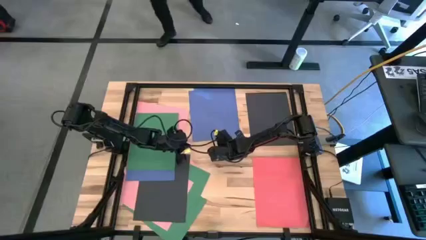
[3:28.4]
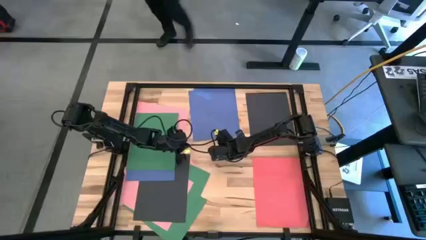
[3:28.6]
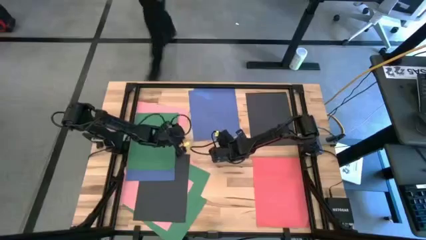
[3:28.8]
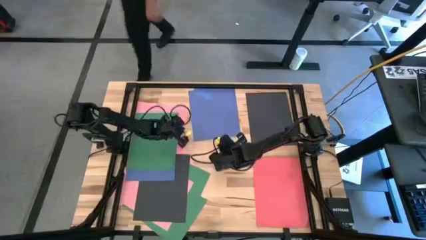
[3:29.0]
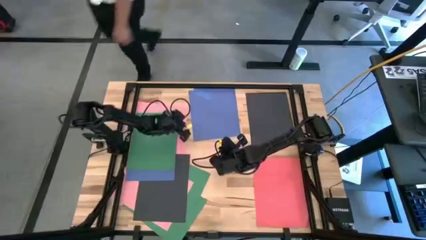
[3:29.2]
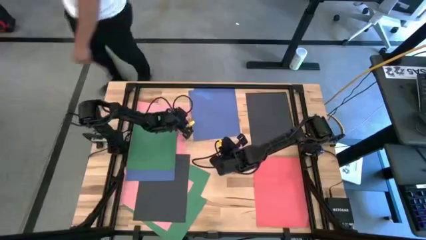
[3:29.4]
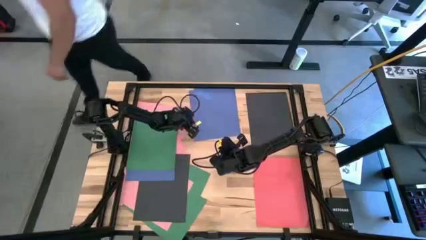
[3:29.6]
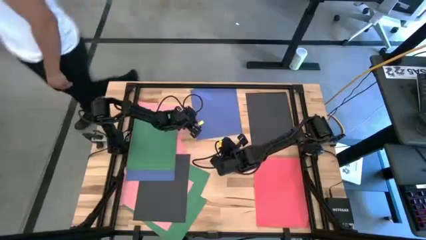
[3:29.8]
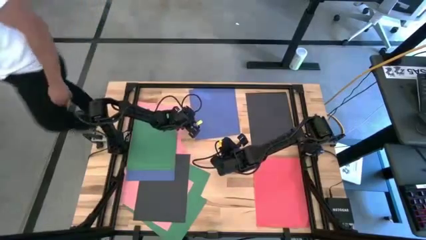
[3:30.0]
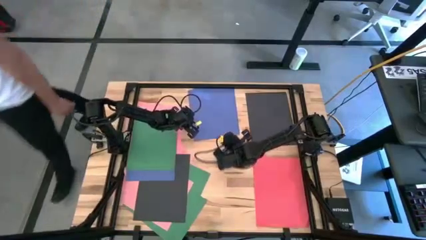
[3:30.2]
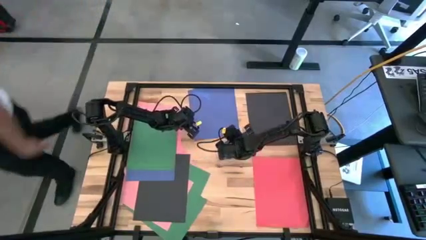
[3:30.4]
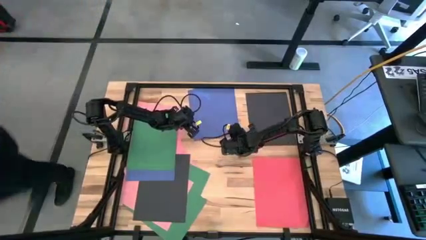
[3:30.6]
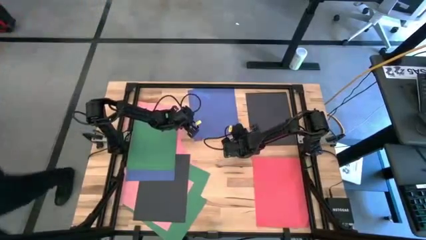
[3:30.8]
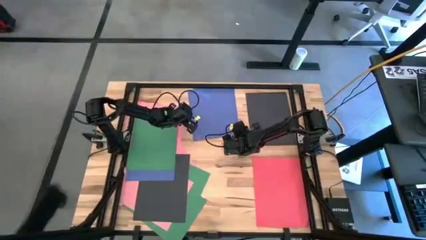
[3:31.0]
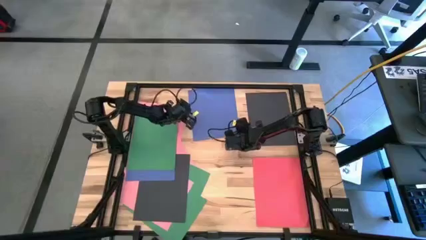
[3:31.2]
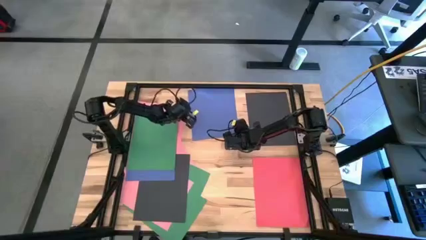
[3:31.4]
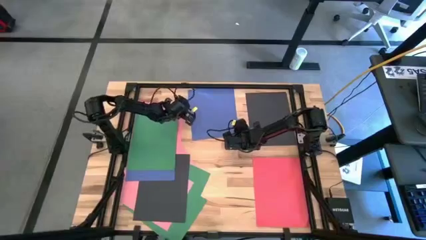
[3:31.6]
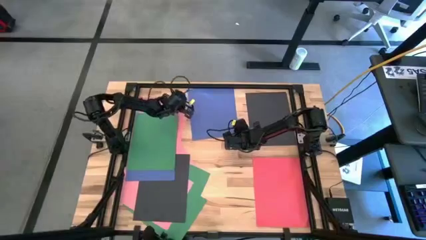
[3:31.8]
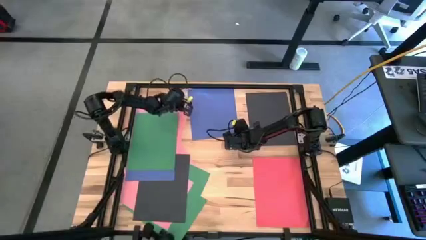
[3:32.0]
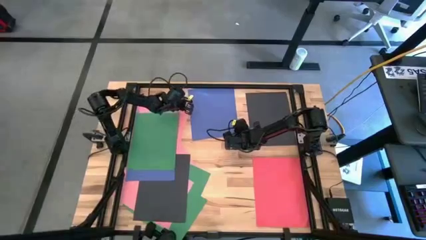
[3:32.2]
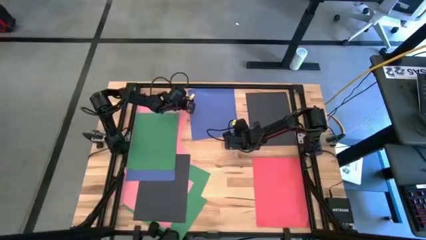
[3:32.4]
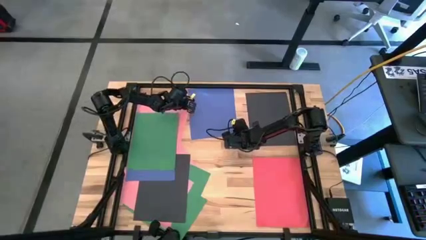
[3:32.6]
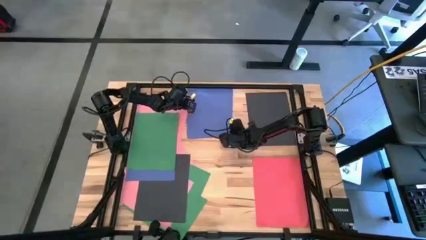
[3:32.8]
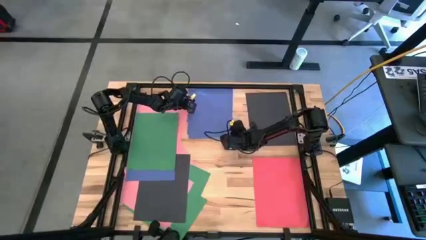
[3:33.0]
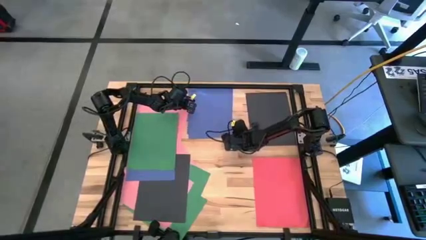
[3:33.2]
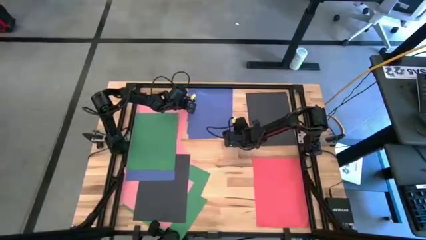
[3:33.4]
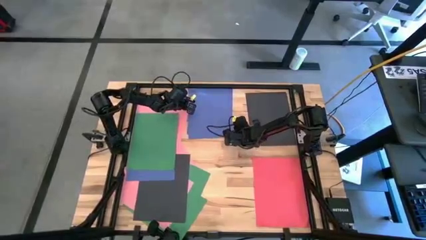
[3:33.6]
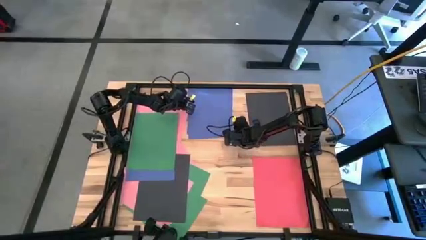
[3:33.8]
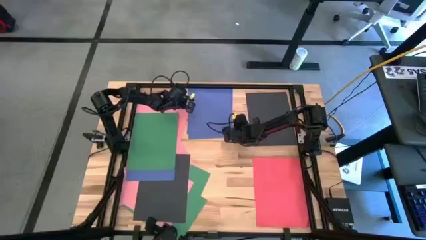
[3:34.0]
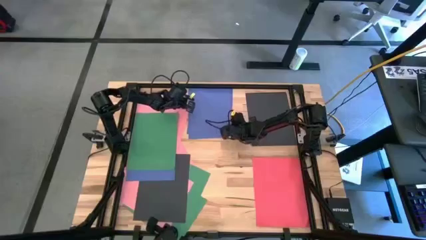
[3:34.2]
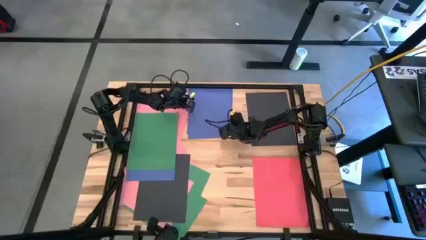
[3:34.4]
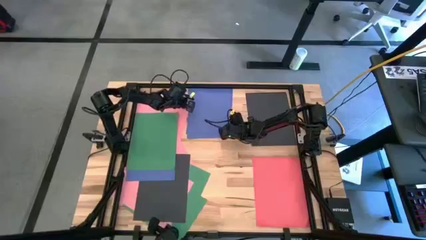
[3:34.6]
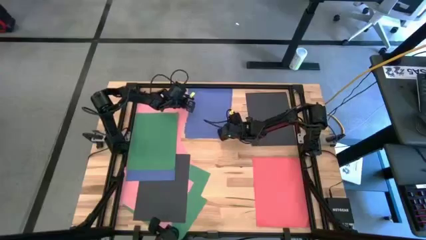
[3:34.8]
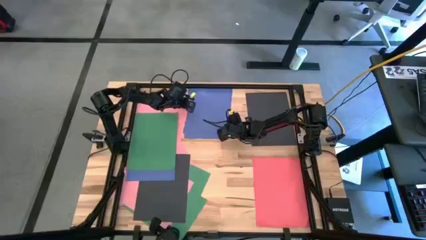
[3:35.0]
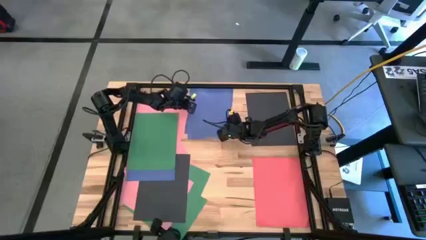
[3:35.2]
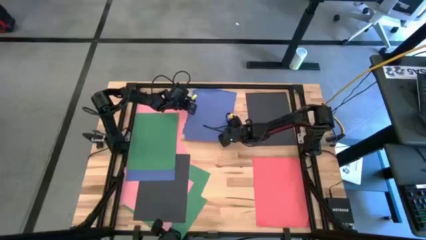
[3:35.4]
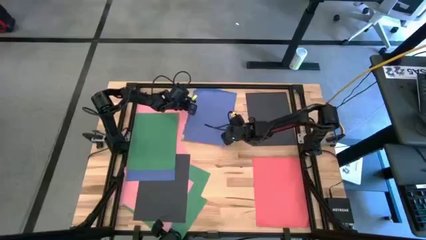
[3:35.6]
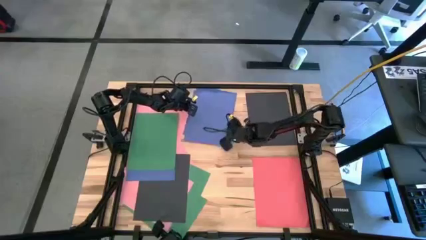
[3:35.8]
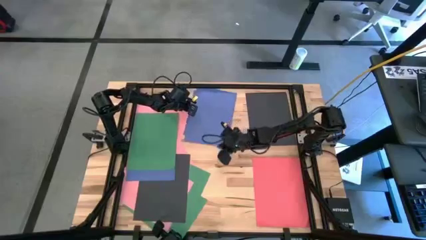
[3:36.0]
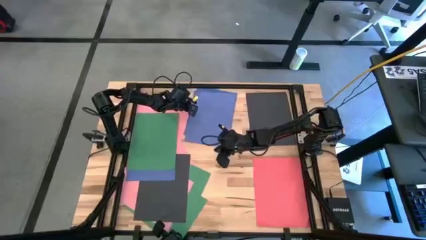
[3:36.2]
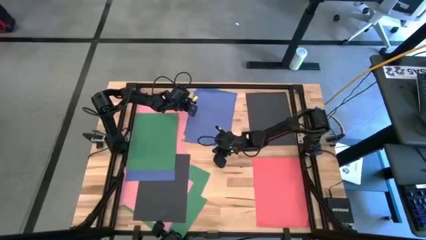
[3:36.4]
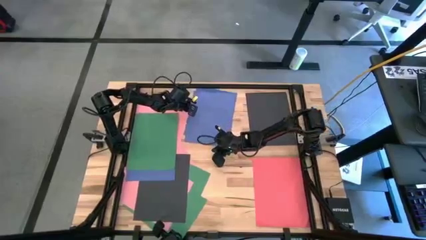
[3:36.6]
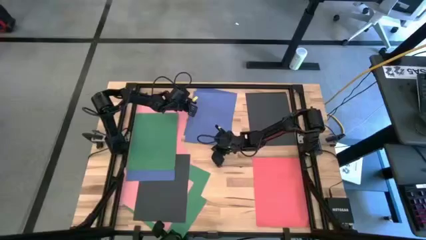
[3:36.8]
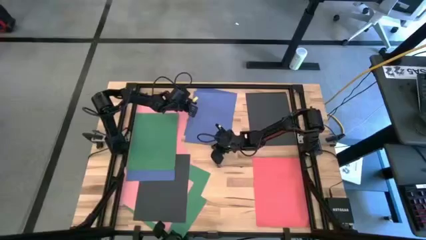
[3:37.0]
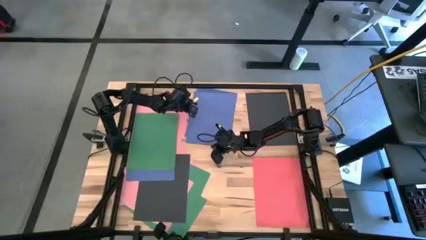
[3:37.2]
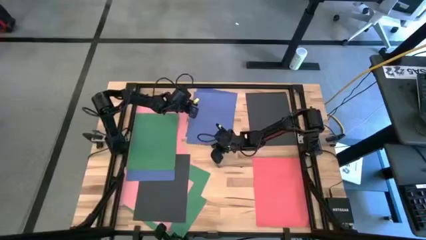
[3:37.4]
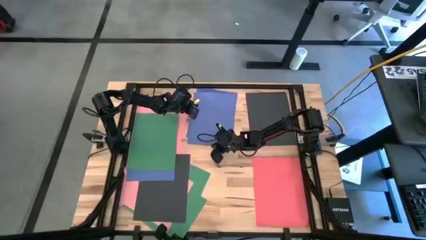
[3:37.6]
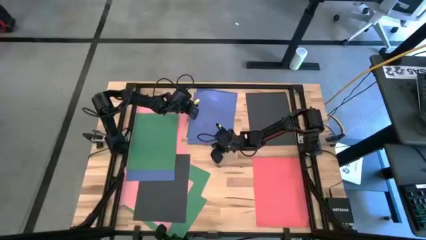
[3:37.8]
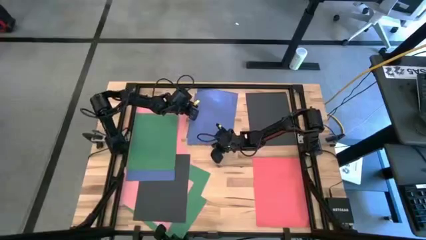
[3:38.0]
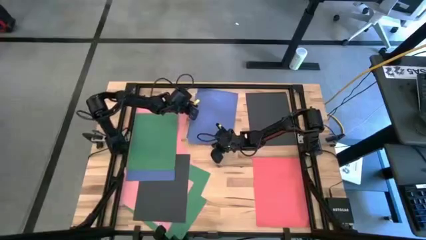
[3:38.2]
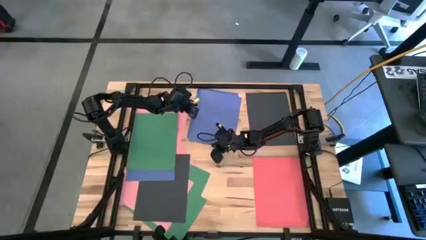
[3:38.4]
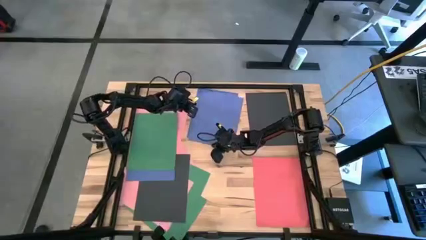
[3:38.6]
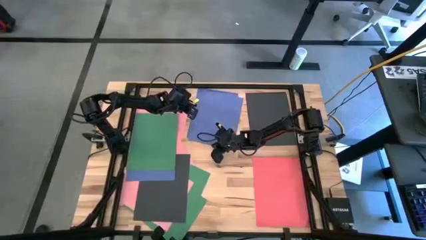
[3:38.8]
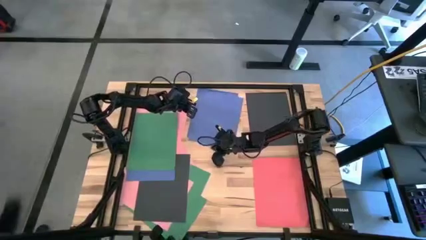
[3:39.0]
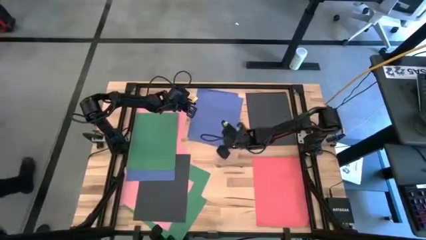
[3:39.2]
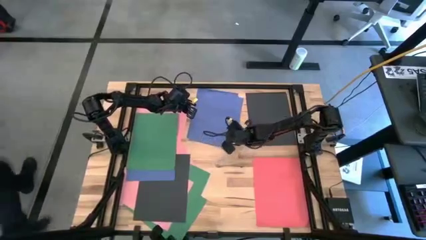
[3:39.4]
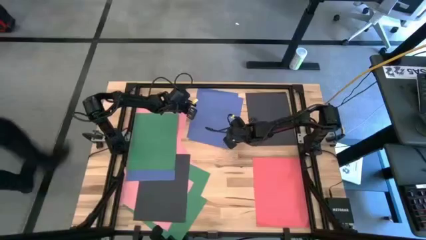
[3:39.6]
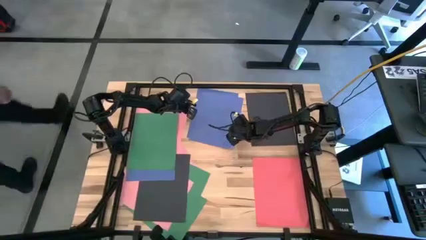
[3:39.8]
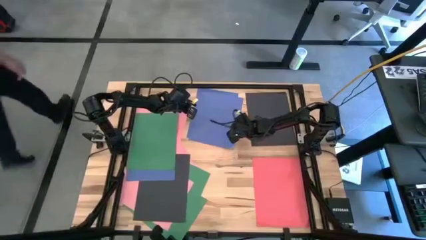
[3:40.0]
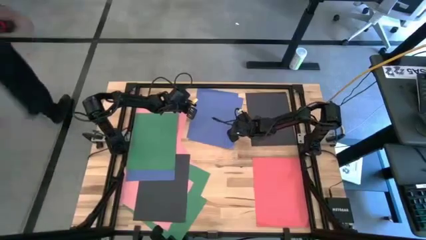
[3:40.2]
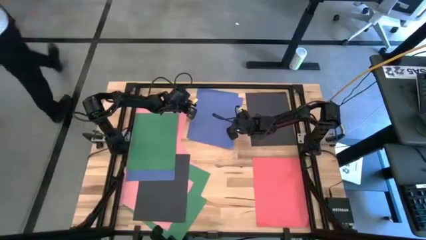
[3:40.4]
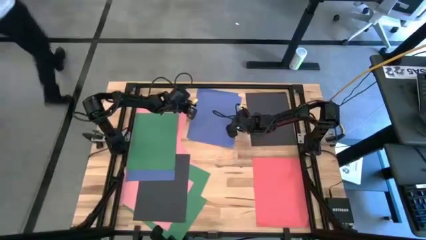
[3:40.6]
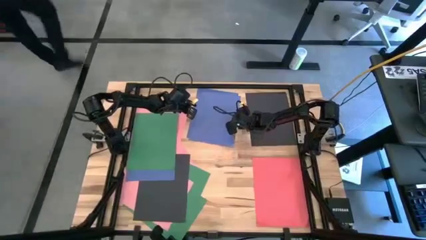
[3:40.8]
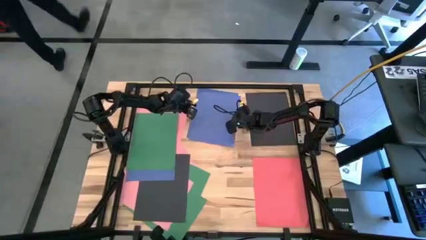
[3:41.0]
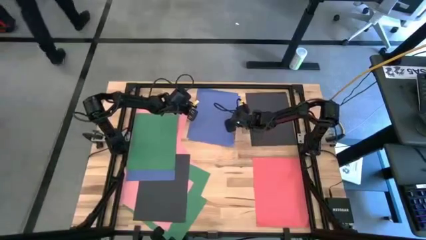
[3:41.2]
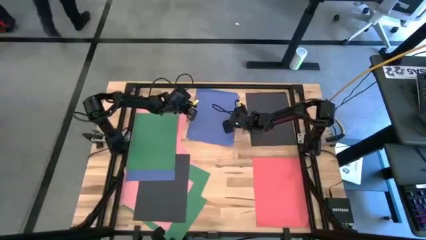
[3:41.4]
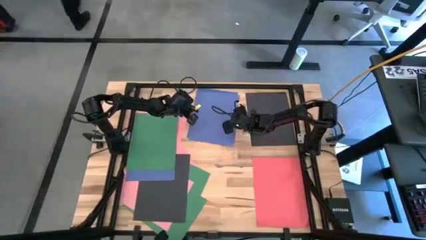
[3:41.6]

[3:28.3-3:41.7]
Task: Organize paper
Stack the blue paper on top of the other blue paper on the table

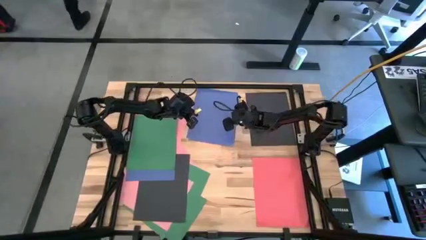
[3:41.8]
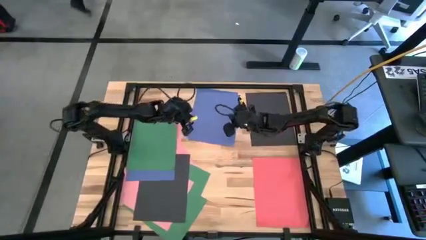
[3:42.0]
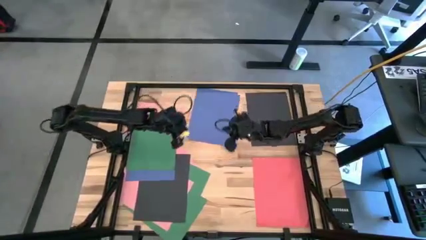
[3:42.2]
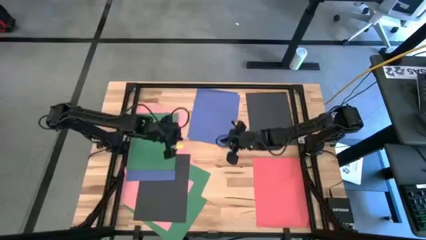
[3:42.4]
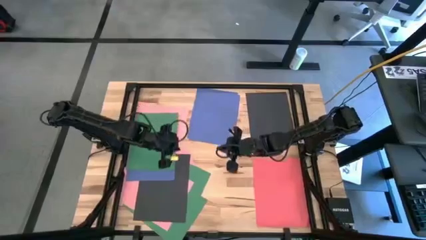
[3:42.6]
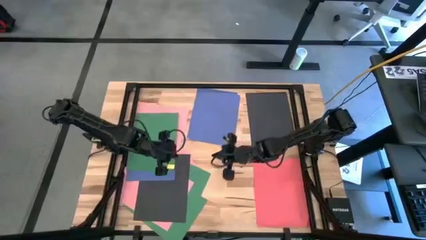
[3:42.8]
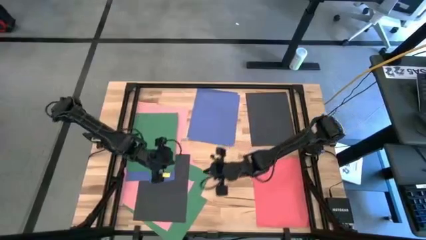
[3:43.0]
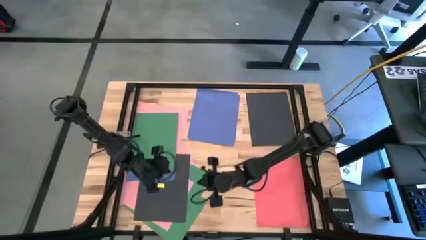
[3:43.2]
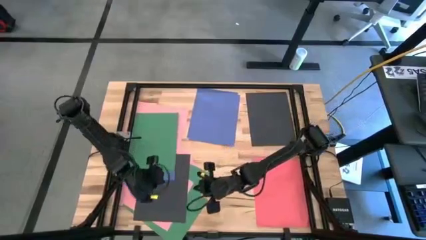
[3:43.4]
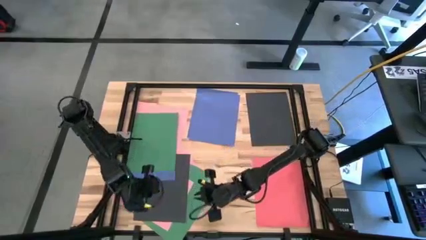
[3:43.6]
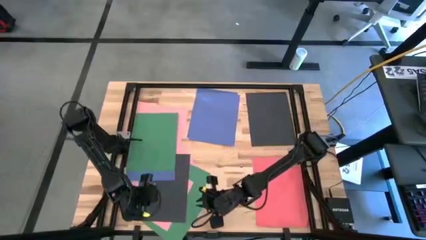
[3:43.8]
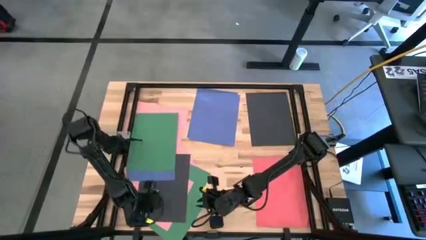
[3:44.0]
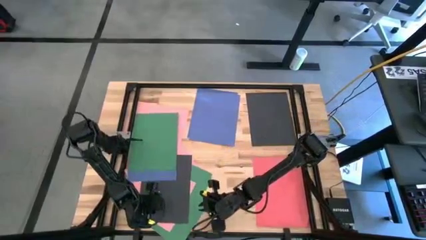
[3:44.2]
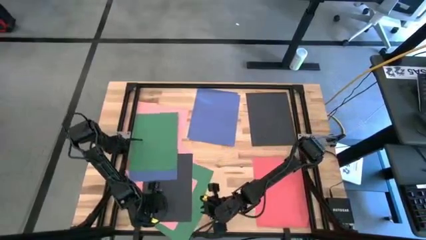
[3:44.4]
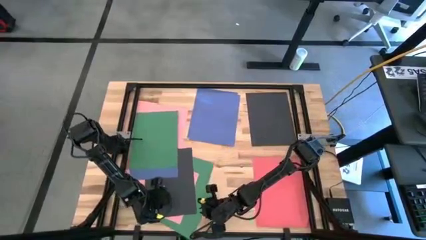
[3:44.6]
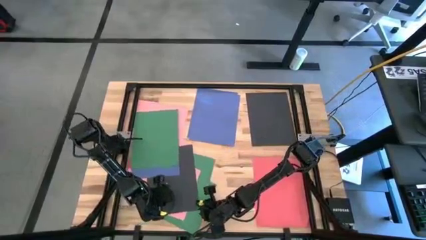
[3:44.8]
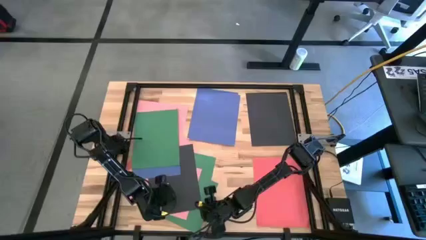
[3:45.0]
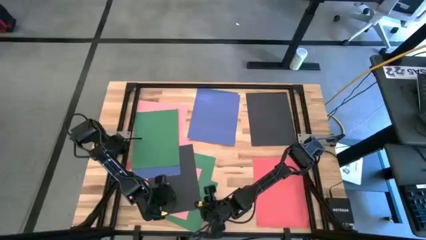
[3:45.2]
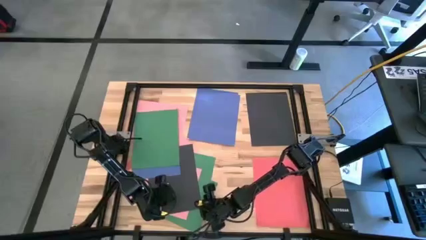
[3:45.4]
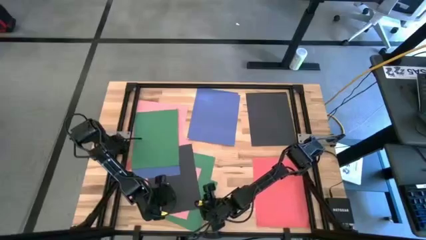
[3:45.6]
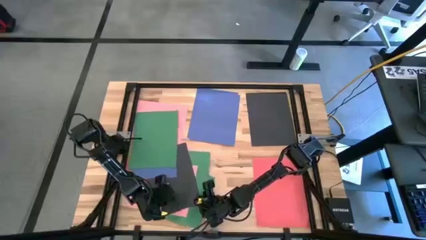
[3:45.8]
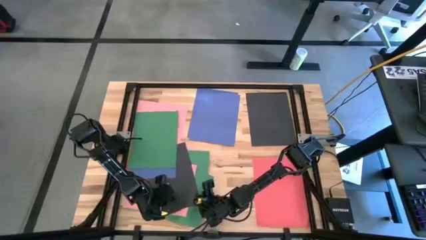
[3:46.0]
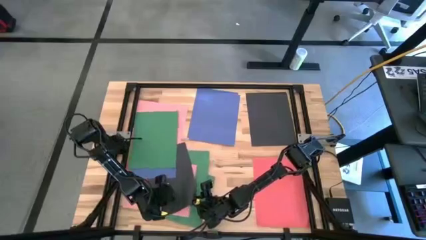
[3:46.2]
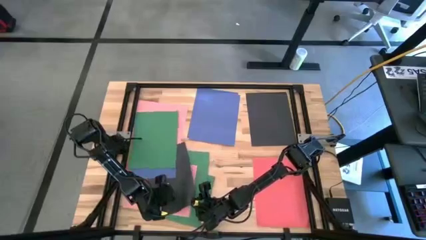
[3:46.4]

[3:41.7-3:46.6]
Stack the black paper on top of the other black papers on the table
